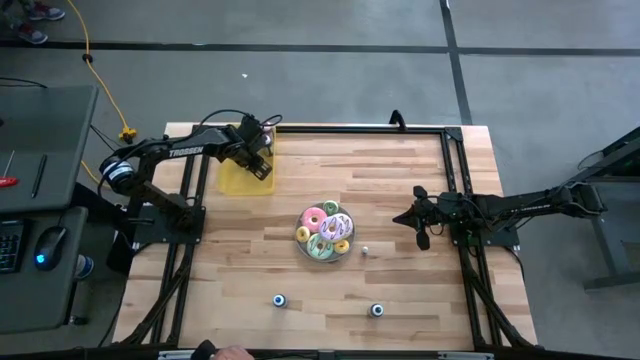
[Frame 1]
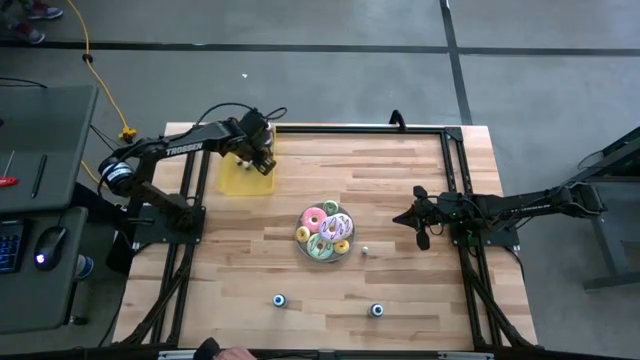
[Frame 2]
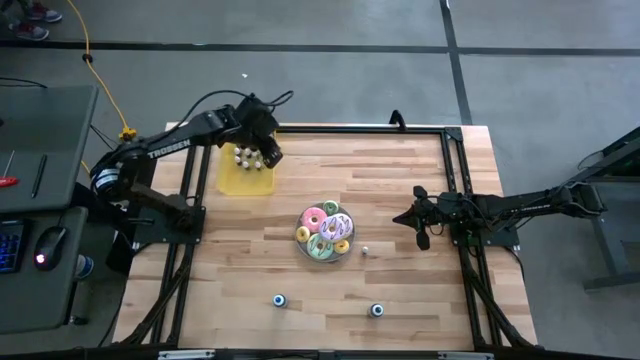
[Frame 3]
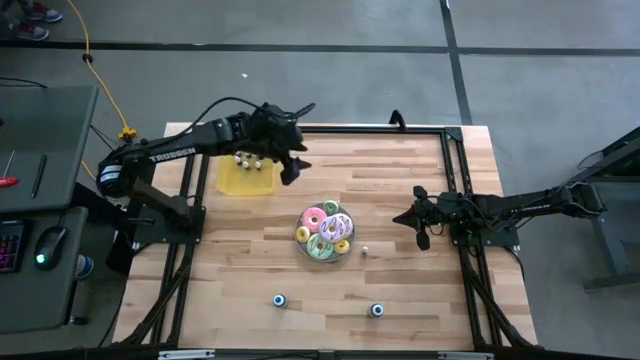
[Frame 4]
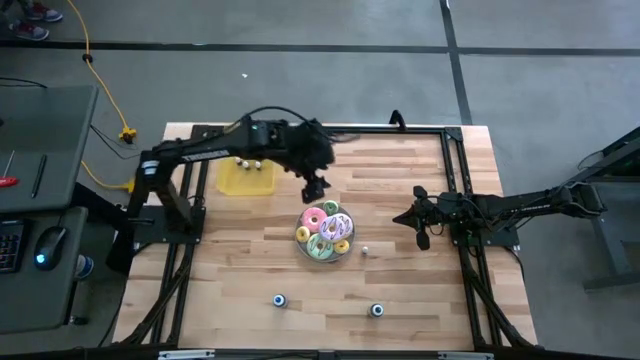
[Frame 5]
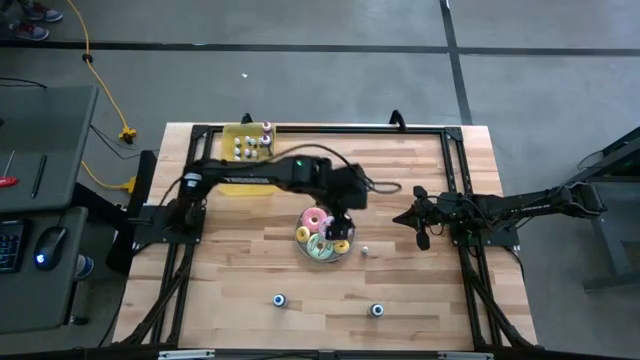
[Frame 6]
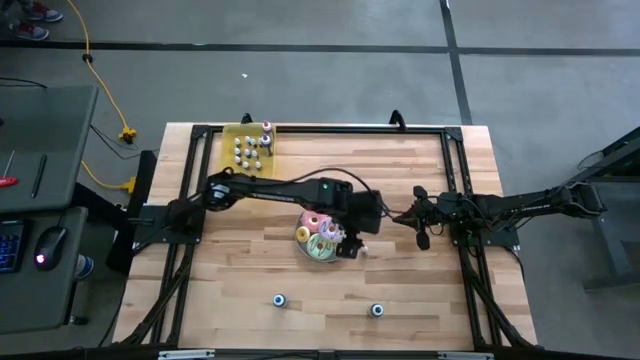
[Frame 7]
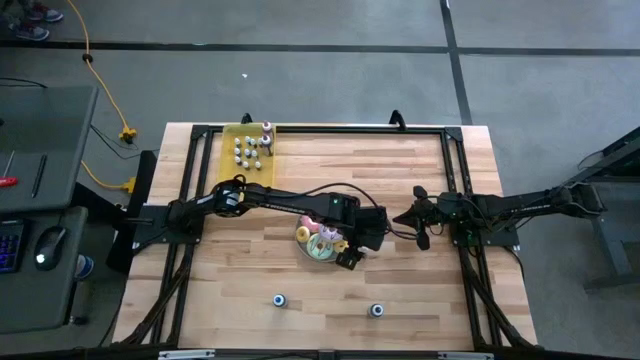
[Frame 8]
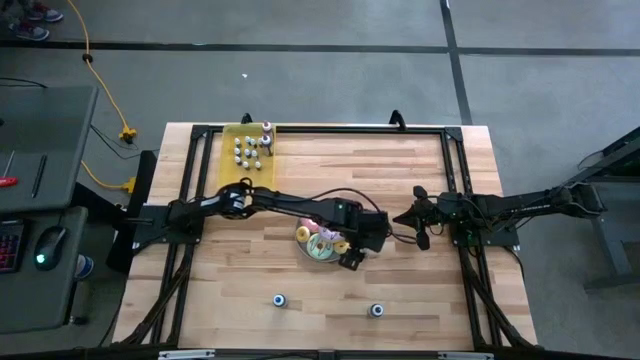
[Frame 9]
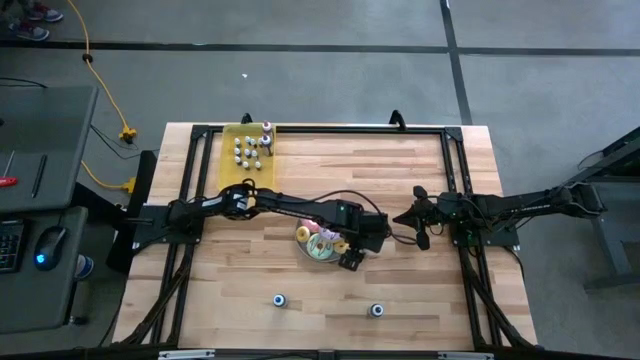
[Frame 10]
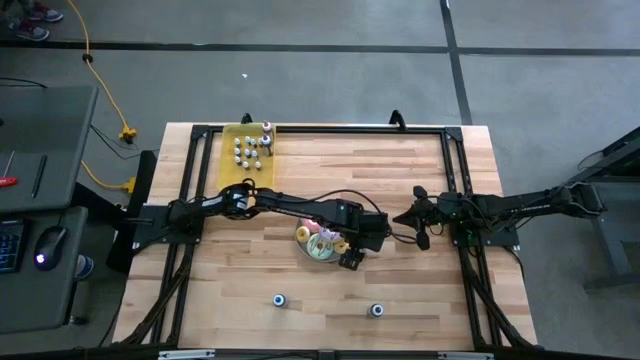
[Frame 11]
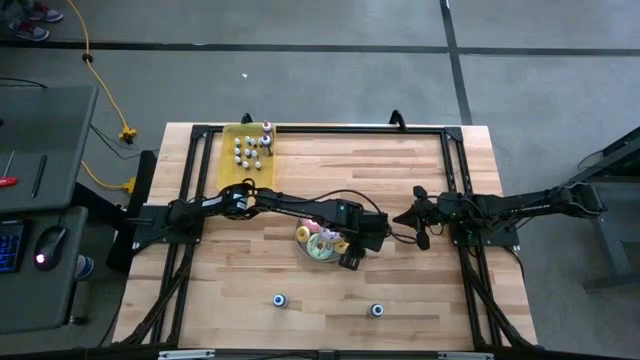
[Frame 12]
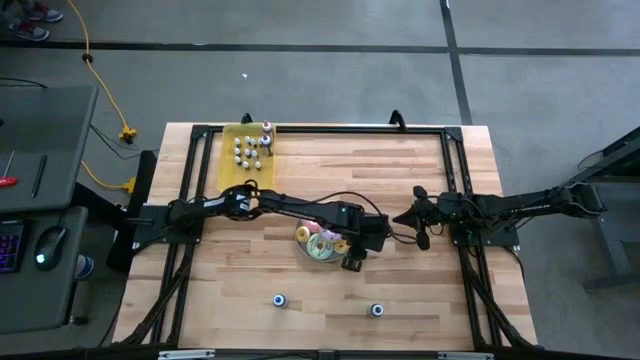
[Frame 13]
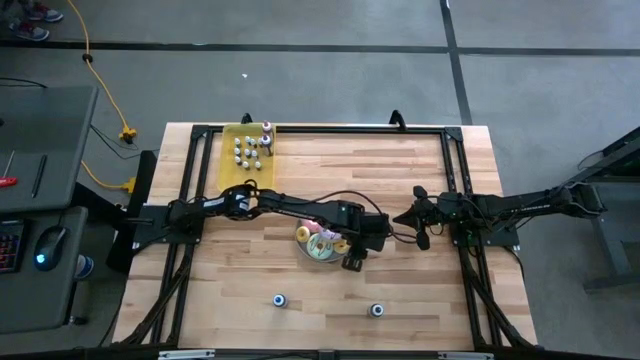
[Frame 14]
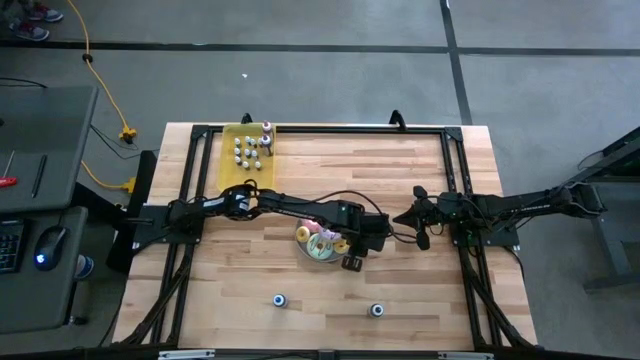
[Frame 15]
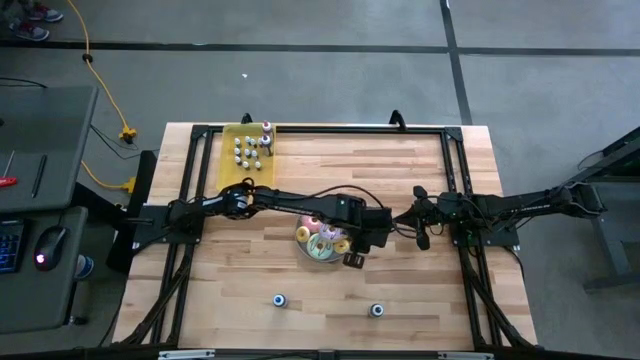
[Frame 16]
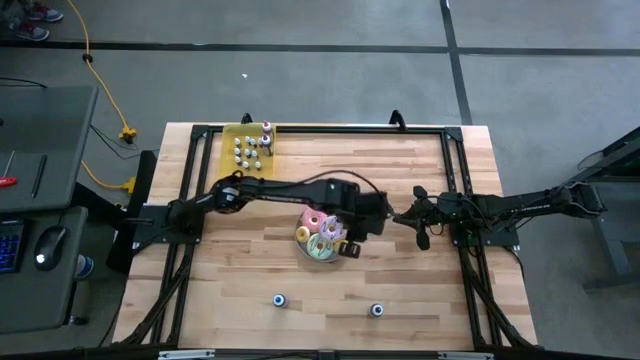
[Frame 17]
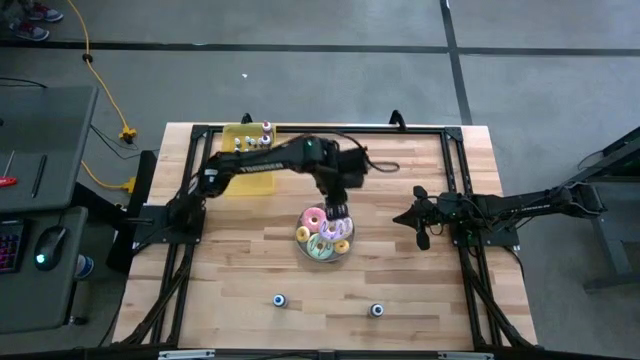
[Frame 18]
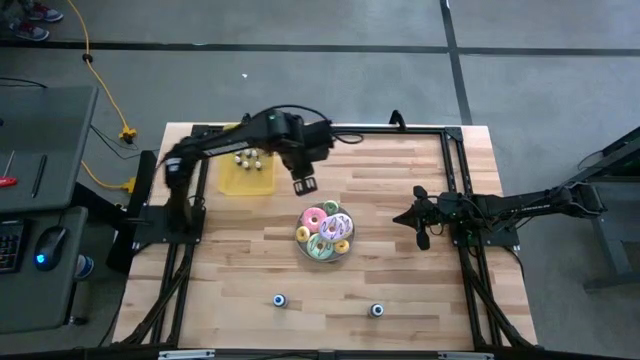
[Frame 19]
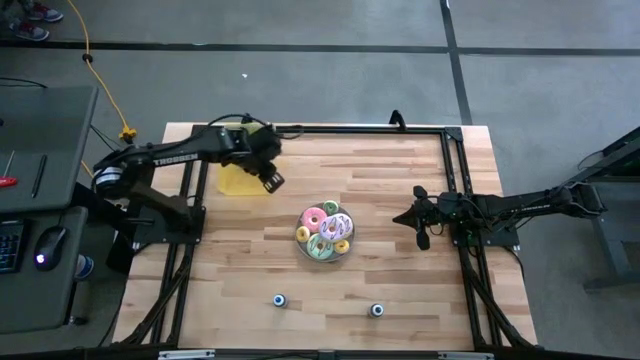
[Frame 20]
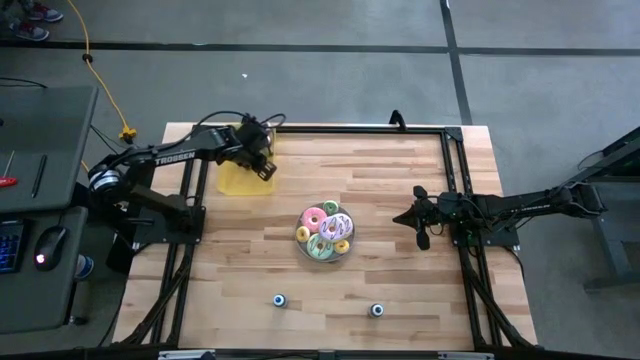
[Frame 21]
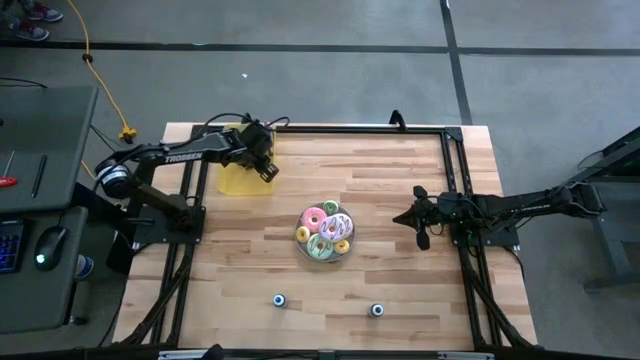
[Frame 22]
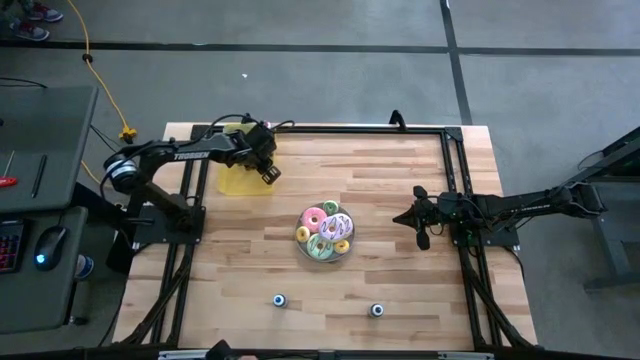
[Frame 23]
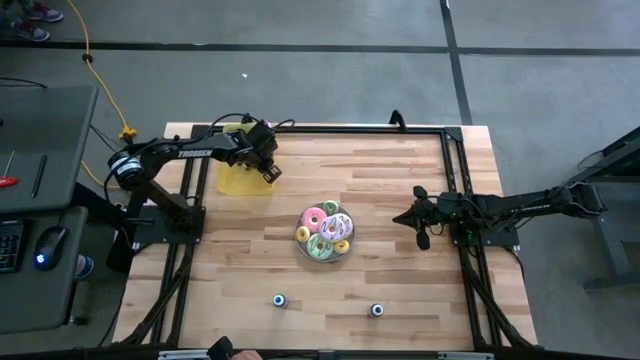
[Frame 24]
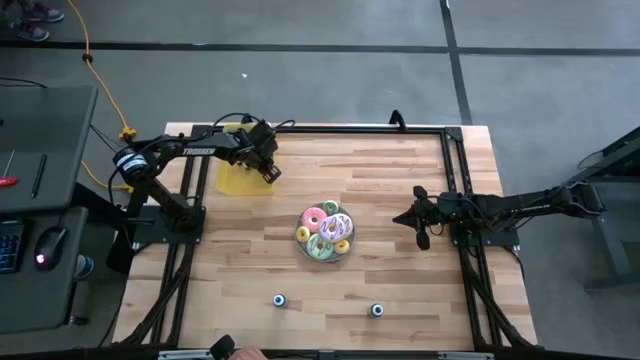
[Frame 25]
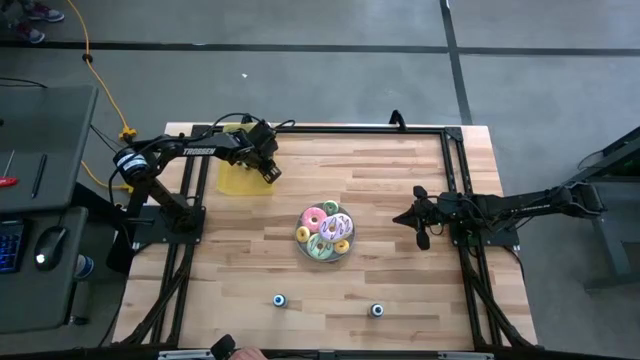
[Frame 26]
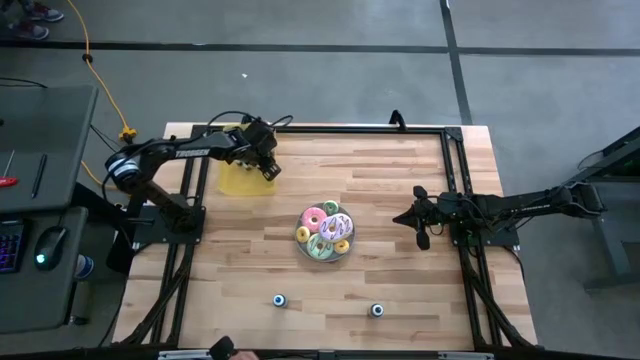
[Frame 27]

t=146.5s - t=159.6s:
Task: Pick & Place food coloring
Put the small red food coloring bottle into the yellow bin

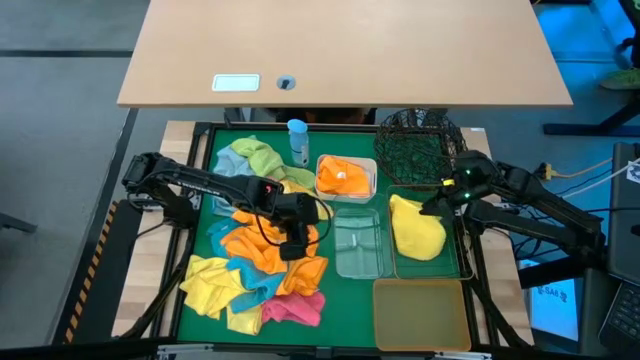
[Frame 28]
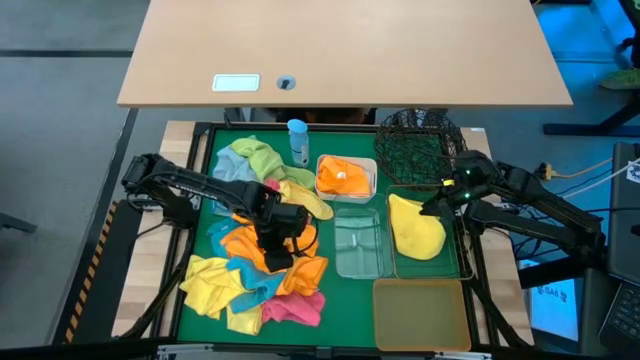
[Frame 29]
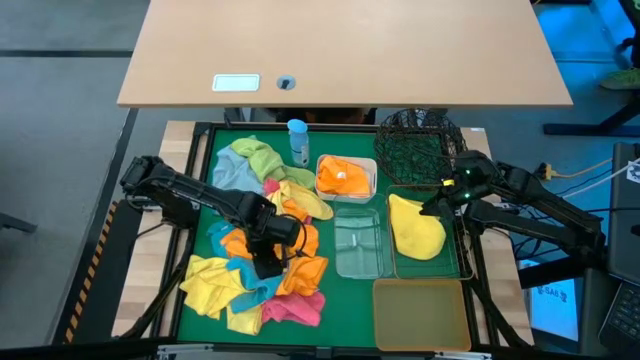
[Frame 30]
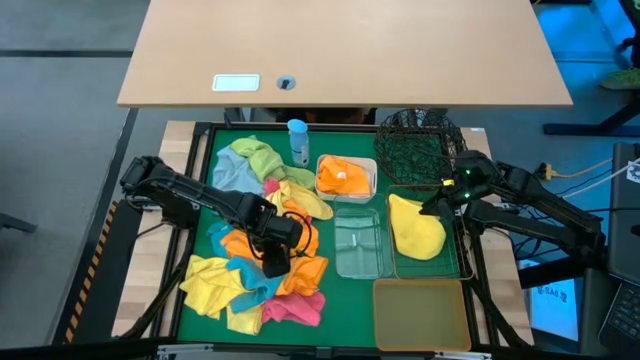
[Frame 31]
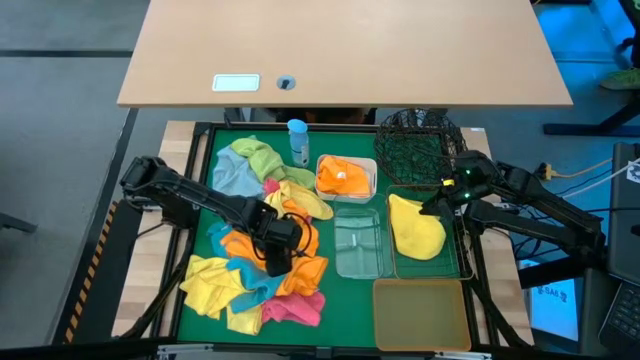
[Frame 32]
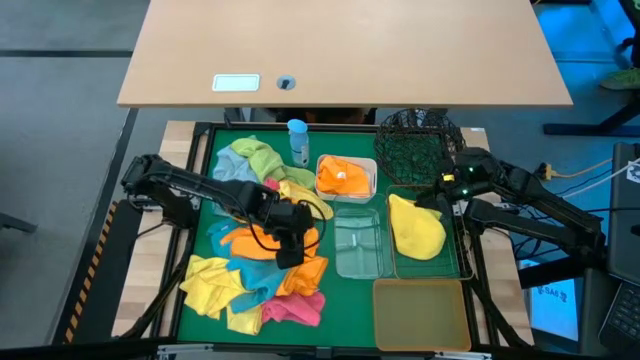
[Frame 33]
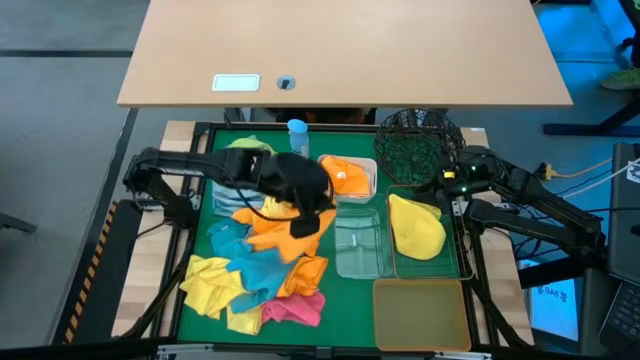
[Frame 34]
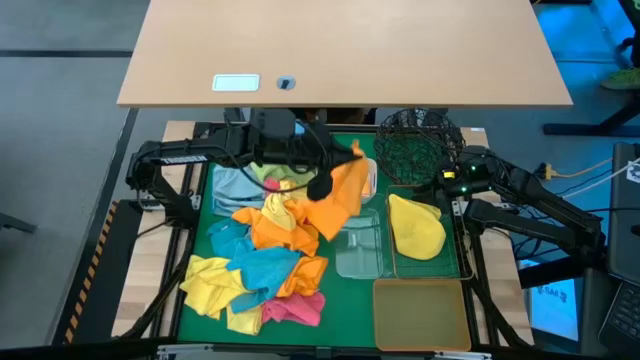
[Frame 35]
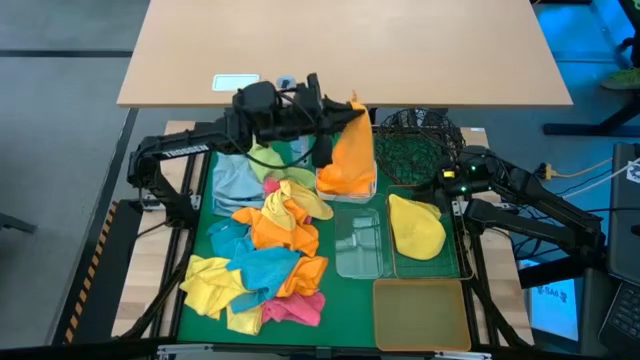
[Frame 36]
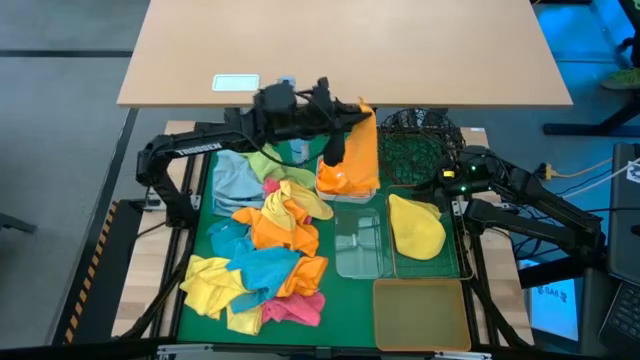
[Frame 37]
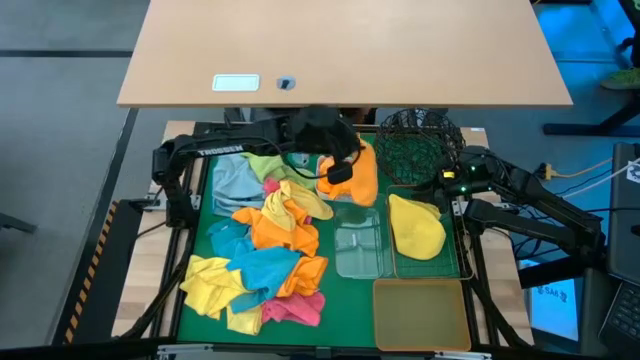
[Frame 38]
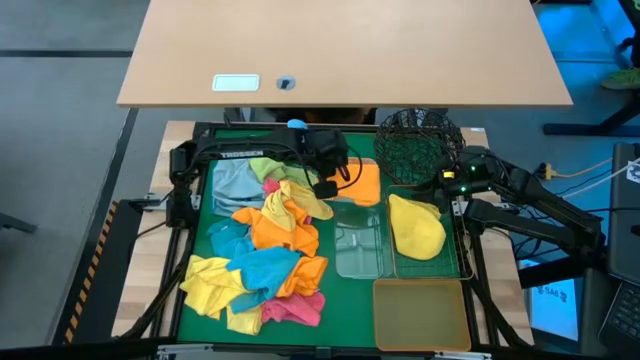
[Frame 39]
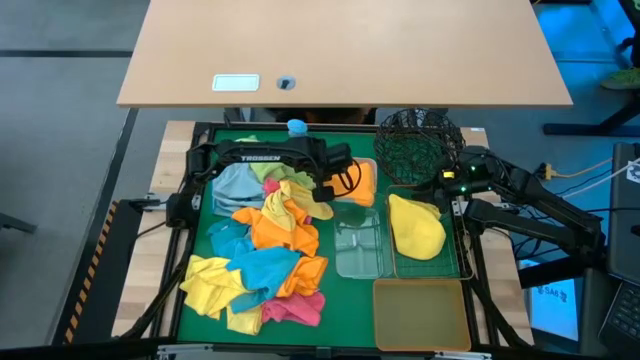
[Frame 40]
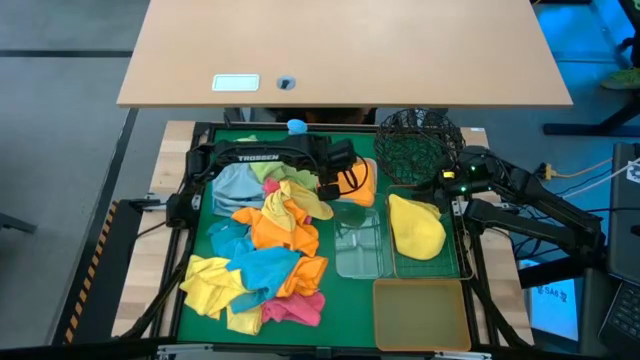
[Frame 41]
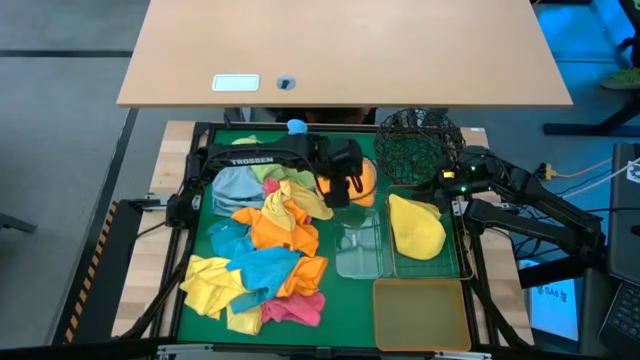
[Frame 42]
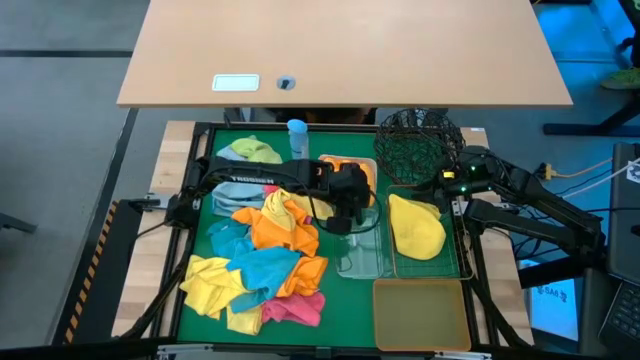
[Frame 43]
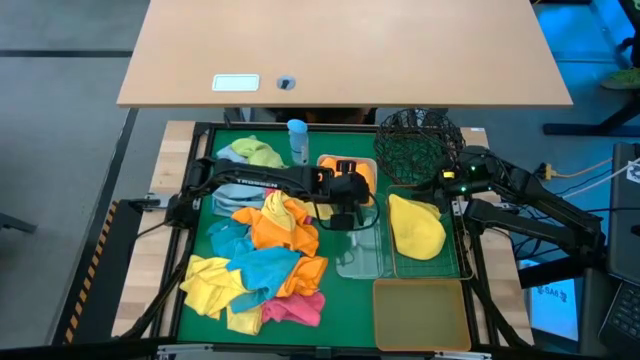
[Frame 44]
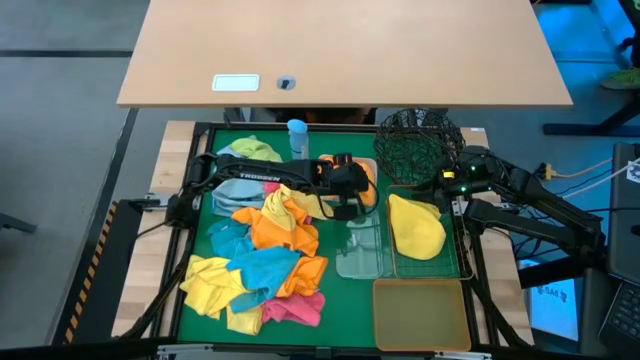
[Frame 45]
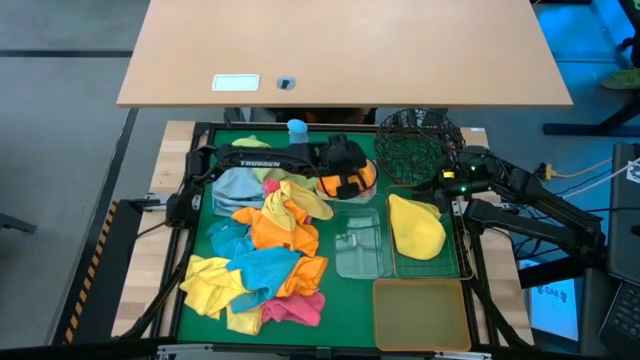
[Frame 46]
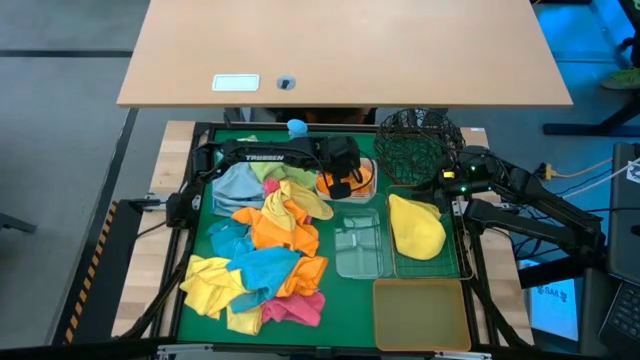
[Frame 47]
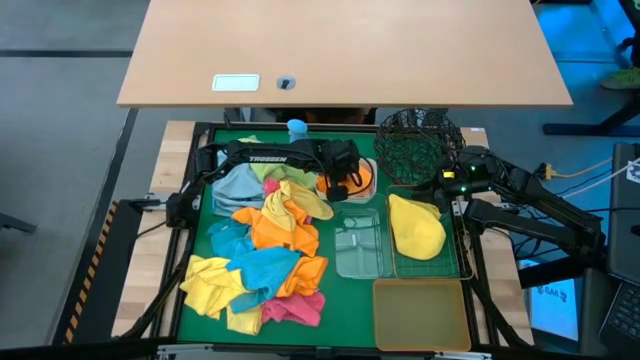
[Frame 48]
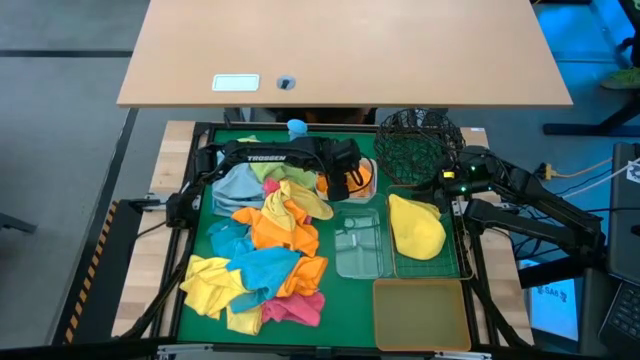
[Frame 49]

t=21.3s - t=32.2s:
Task: Sort microfiber towel by color & place in baskets
Put the orange towel into the white bin
